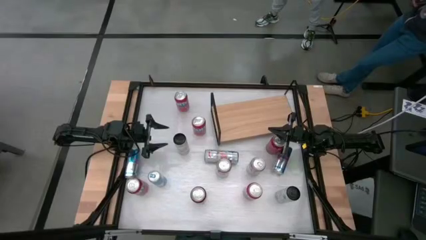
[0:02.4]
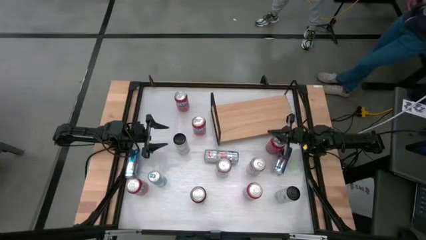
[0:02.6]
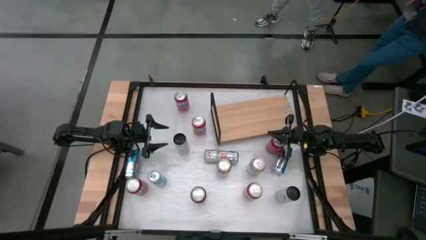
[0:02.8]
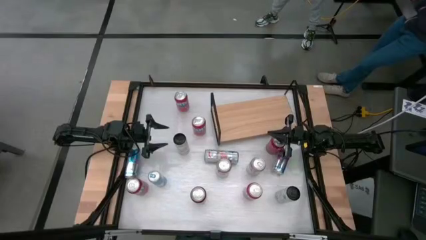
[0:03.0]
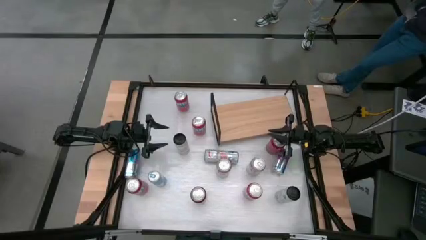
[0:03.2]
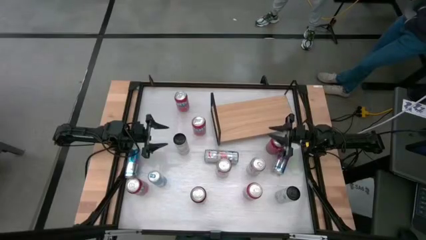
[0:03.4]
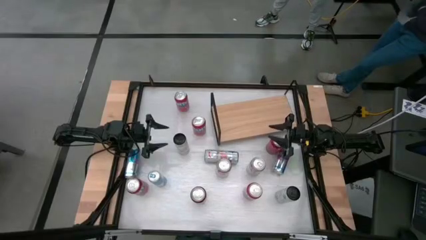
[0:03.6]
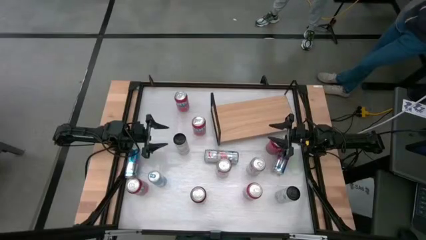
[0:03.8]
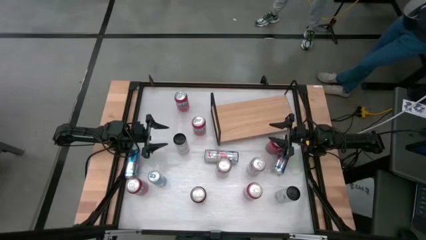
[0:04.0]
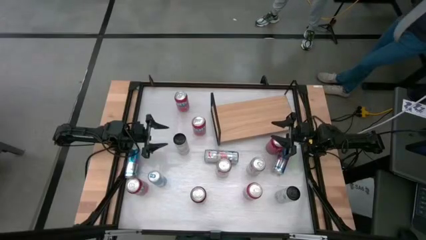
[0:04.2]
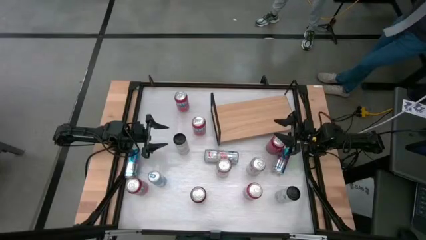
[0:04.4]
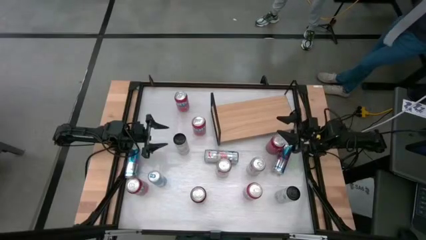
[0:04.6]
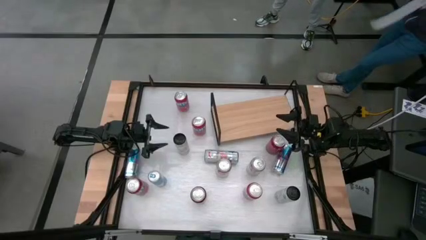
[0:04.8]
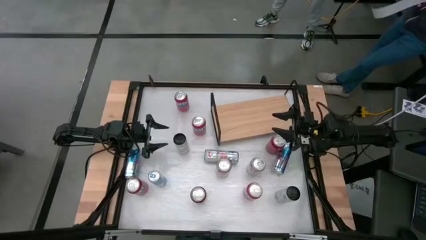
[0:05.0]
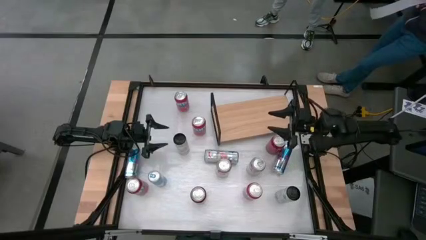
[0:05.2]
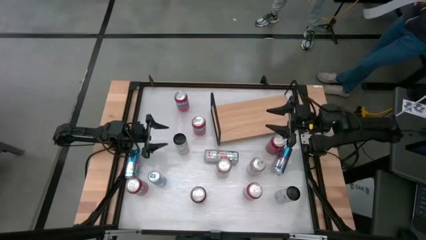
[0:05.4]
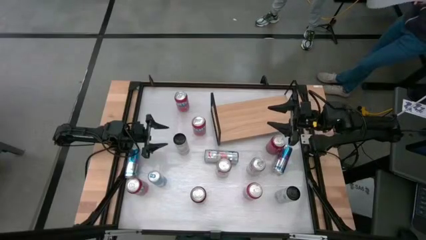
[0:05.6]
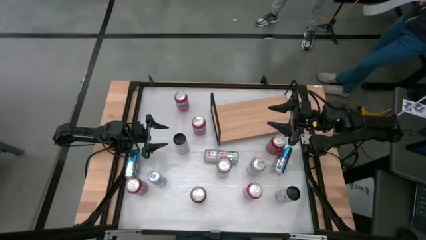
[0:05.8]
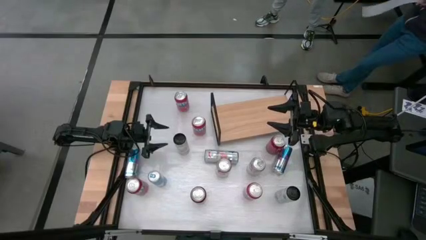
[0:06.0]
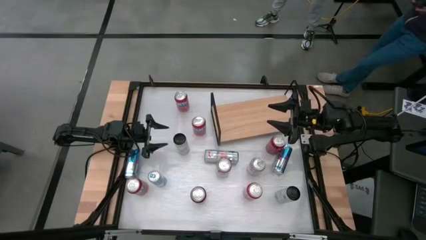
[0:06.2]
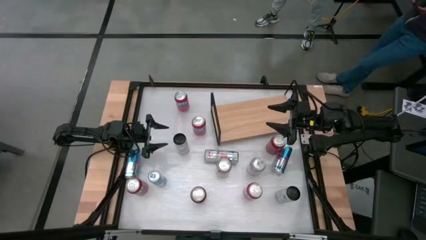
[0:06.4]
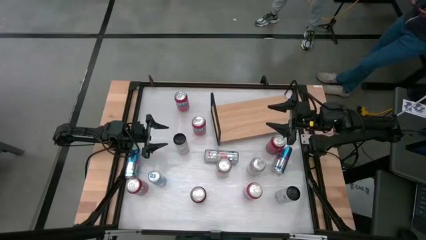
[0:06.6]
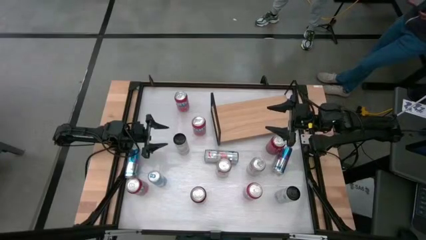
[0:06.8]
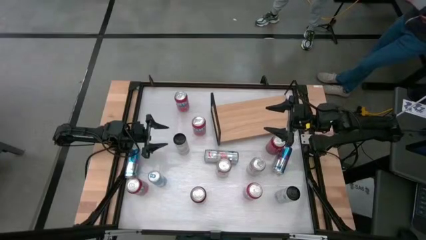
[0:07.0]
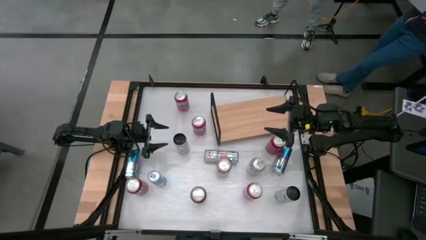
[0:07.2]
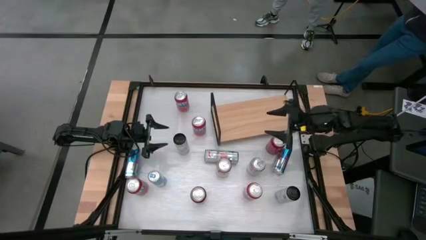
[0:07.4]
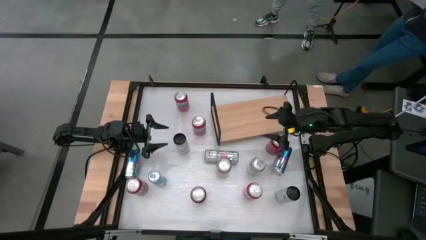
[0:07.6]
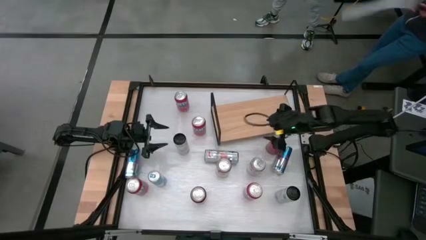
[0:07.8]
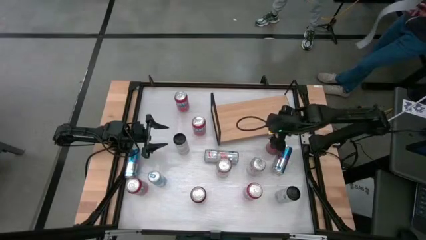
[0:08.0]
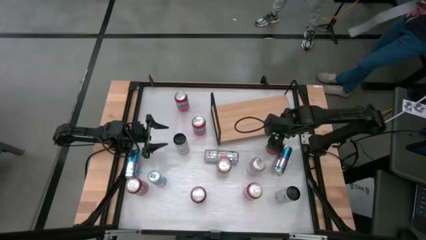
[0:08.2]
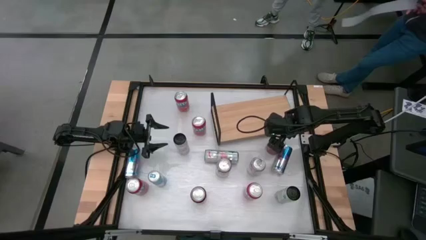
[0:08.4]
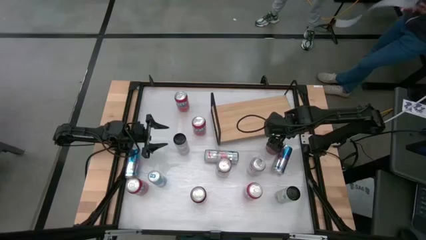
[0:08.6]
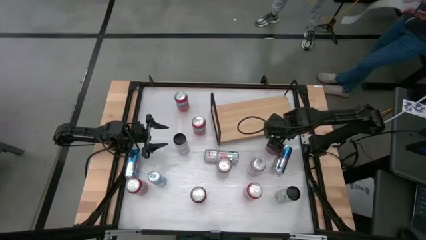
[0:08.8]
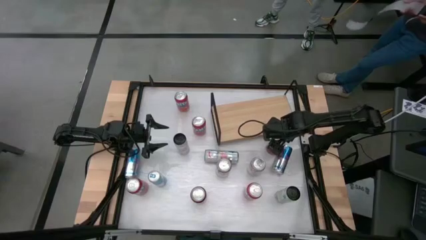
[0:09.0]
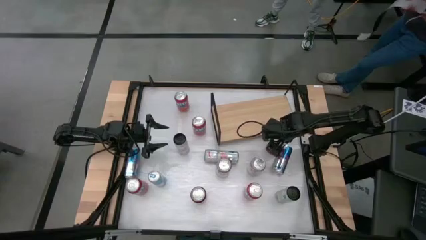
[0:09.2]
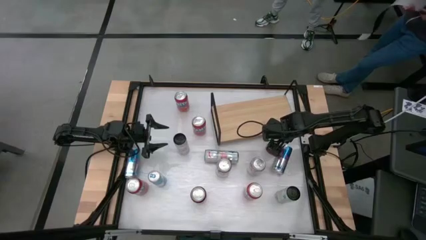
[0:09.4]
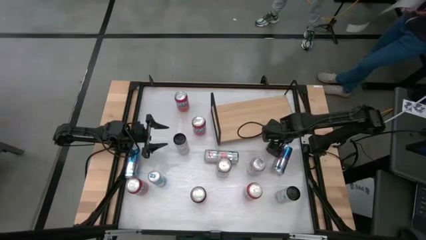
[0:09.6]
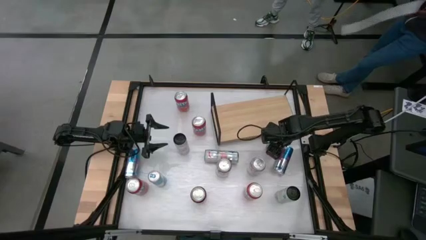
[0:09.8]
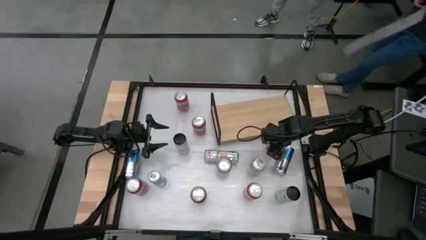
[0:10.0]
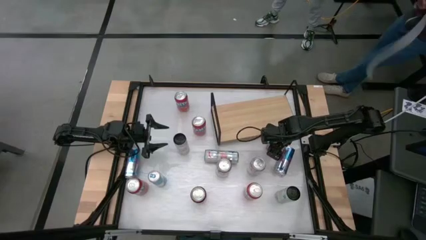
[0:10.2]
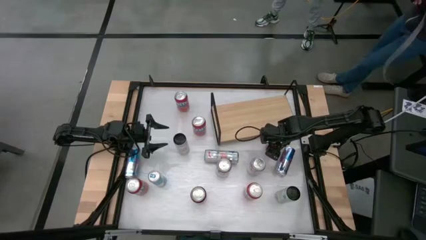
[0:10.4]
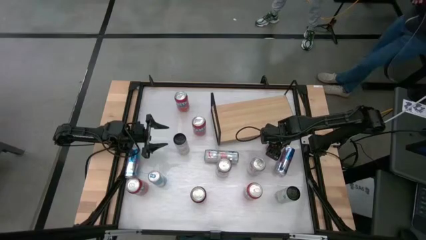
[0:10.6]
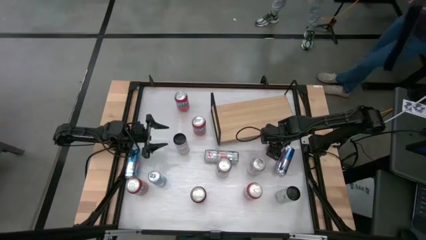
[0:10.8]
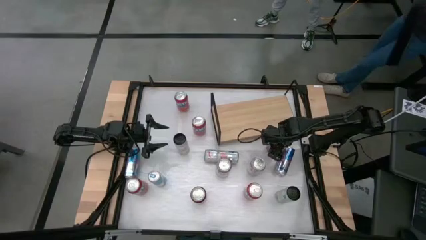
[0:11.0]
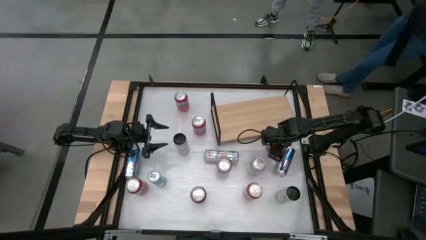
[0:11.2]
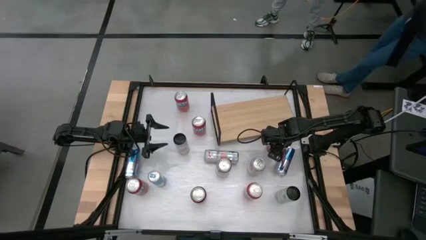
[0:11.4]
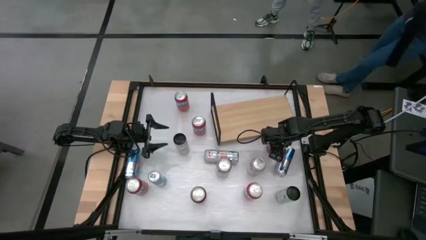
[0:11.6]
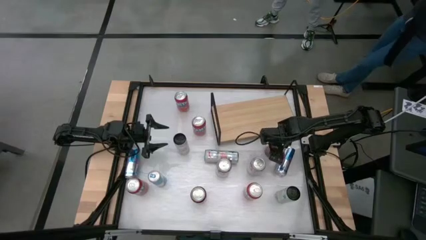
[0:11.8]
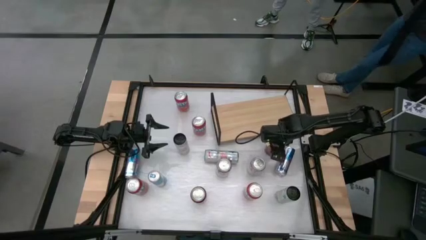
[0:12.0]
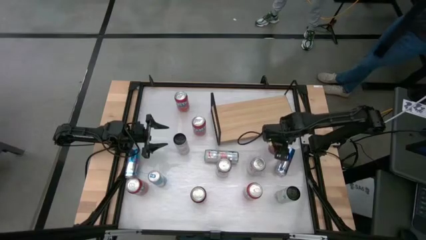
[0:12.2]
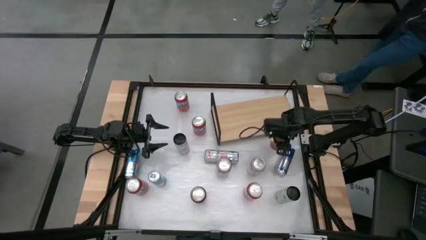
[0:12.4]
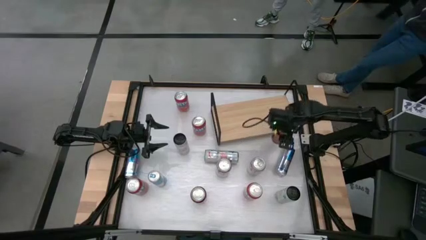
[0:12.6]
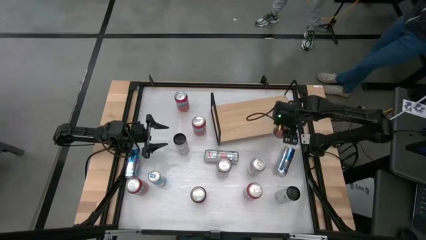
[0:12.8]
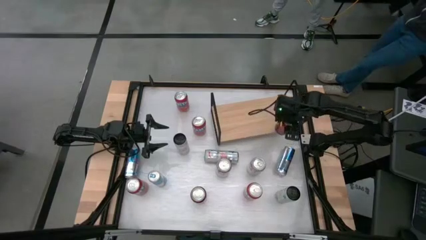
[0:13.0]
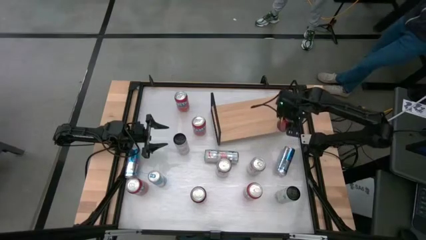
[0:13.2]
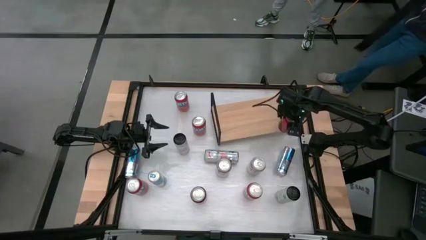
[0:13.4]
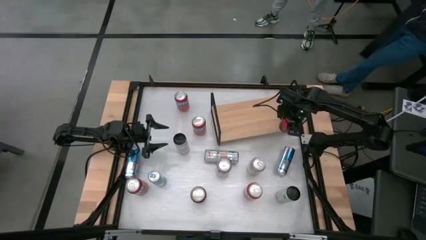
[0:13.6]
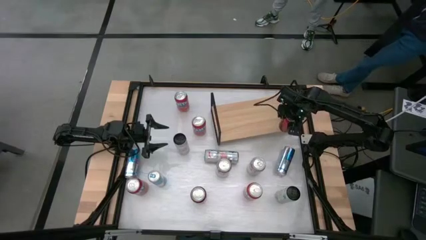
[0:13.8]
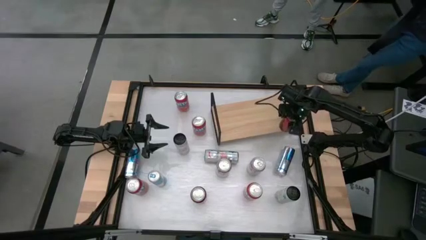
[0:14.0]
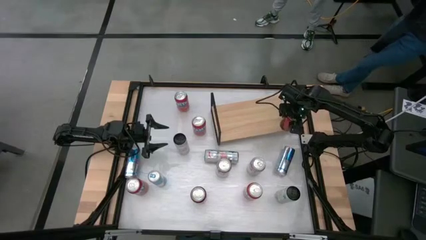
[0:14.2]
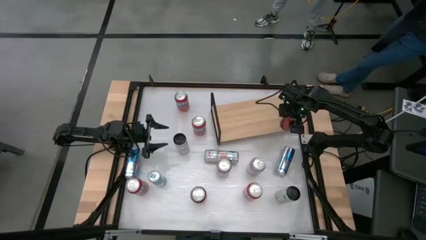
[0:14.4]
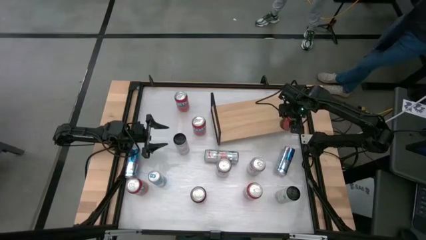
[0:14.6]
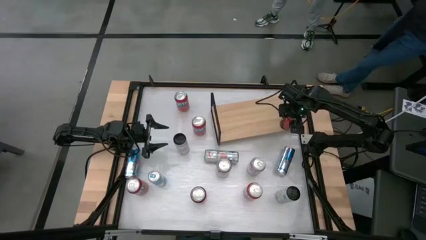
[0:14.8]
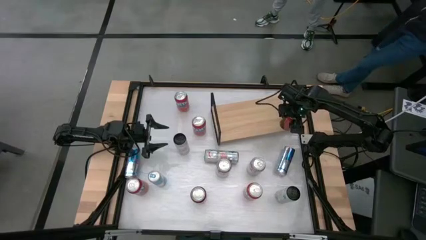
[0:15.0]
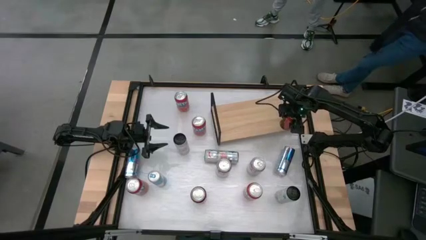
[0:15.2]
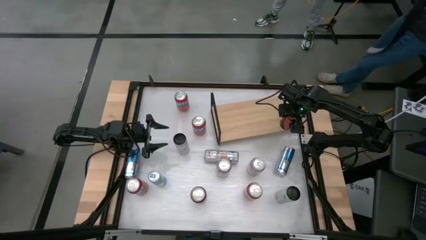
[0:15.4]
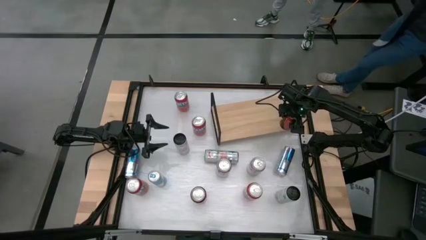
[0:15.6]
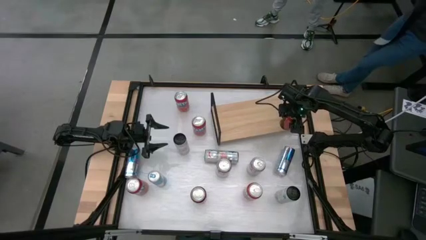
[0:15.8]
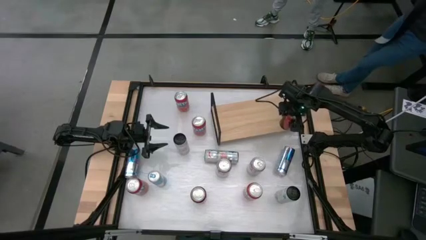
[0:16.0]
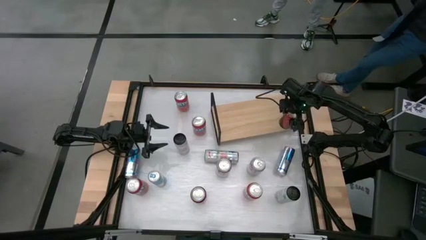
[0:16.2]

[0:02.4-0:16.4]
Task: Place canned beverage on shelf
Put the top right red soda can on the shelf

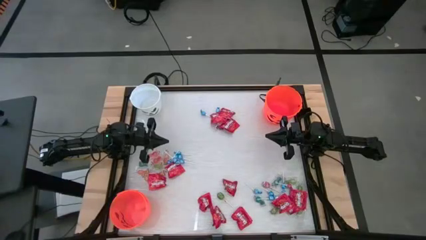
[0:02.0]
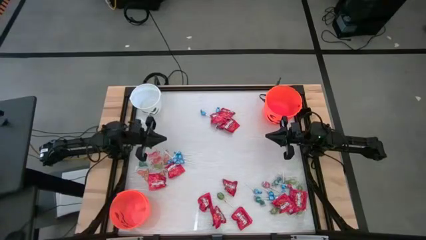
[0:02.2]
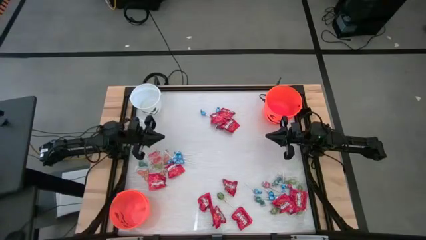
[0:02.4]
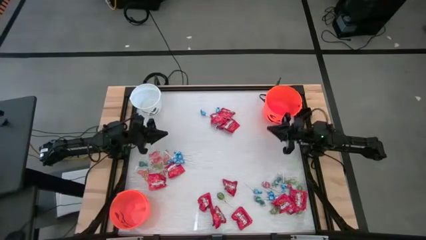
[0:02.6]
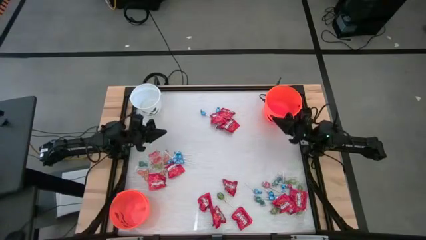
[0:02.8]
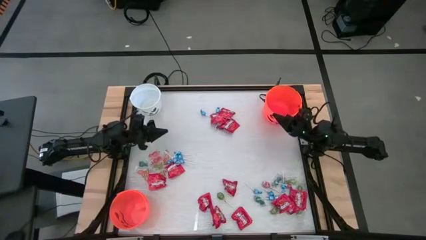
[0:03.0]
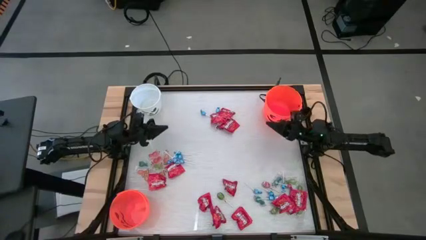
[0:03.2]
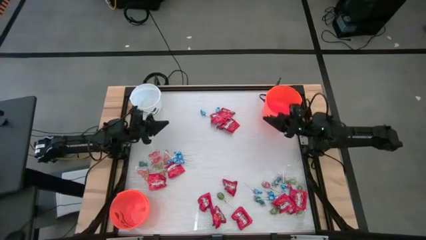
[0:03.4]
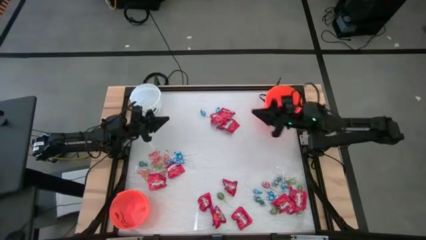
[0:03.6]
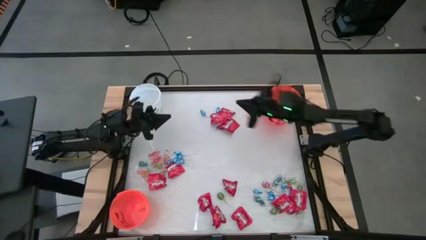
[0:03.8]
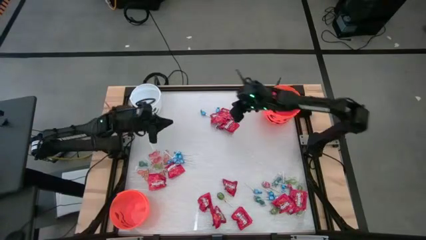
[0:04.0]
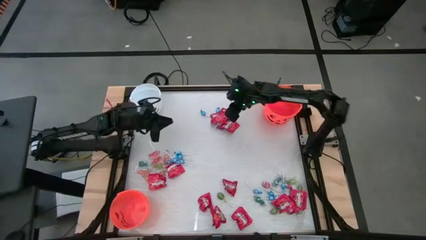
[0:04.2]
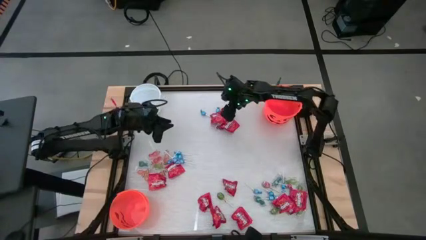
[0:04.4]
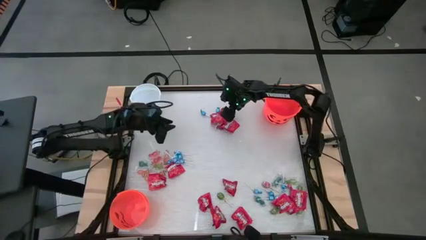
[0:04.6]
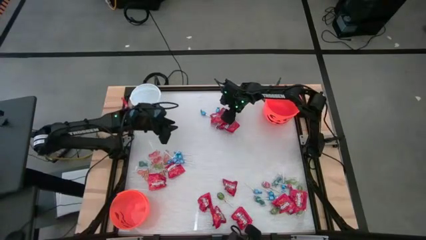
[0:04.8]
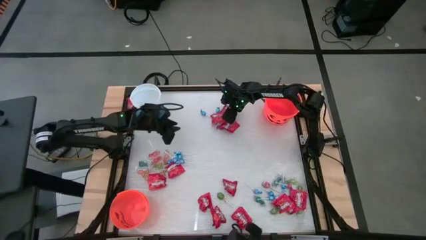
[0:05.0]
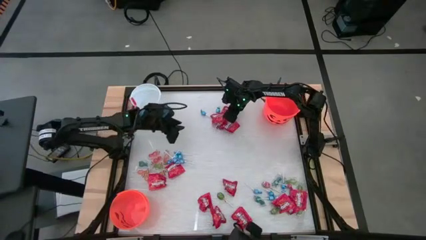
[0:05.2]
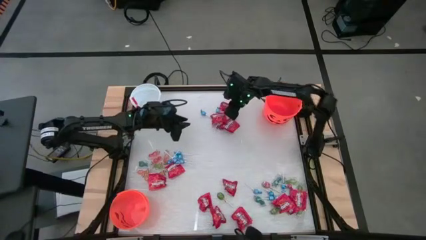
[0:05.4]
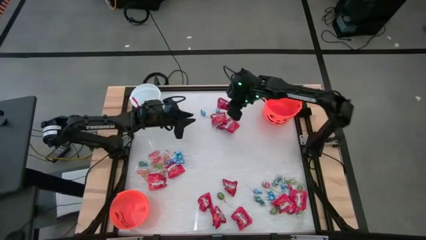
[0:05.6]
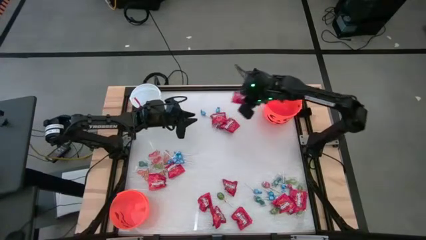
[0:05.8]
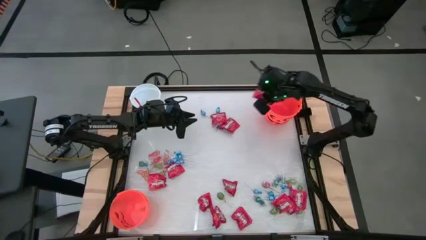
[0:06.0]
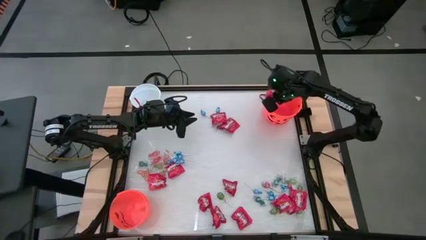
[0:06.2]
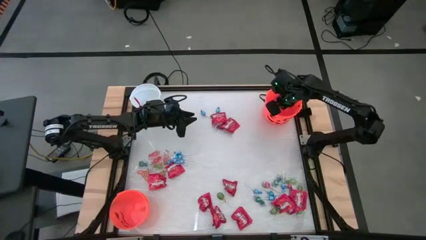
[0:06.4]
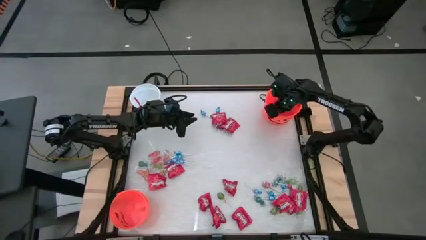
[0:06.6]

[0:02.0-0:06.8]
Task: Sort candy by brand, put in halloween buckets
Put the red candy into the top orange bucket
